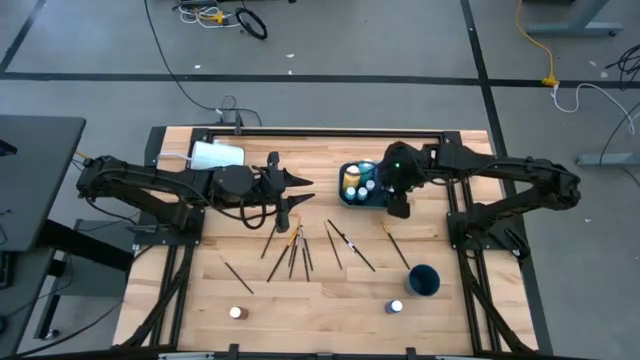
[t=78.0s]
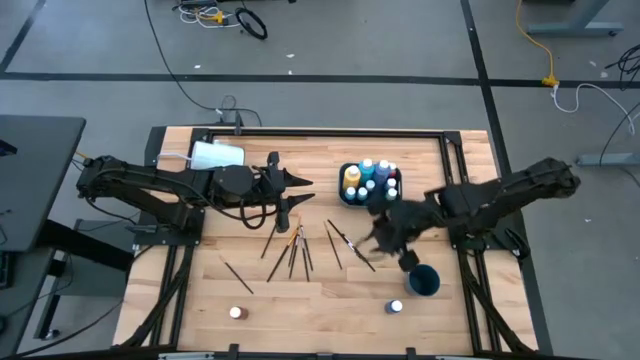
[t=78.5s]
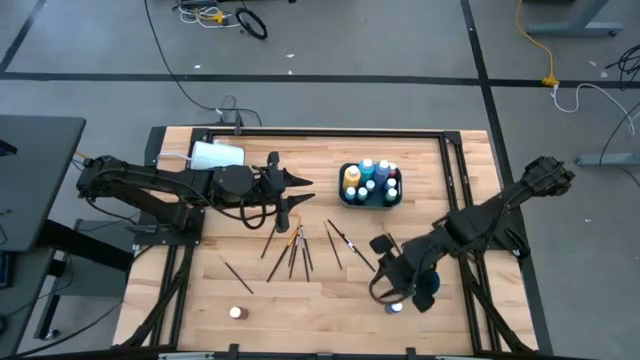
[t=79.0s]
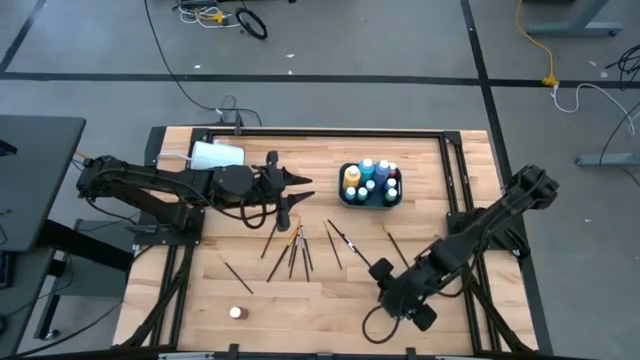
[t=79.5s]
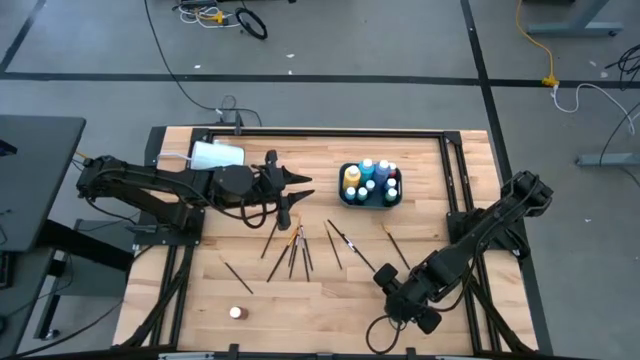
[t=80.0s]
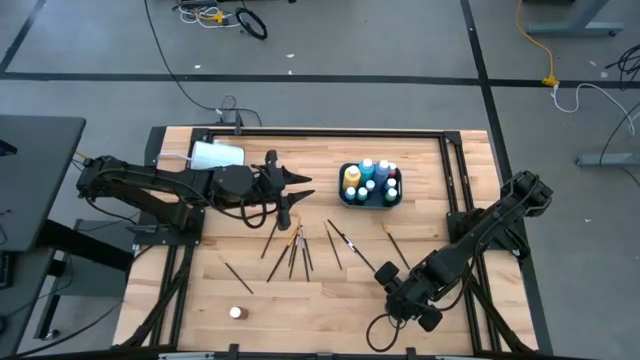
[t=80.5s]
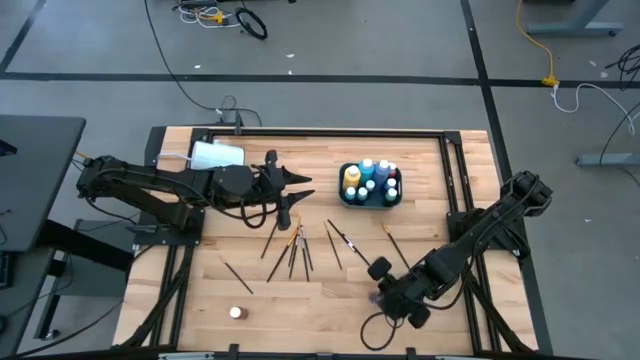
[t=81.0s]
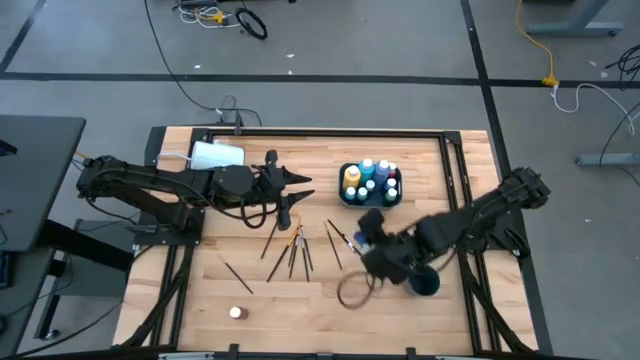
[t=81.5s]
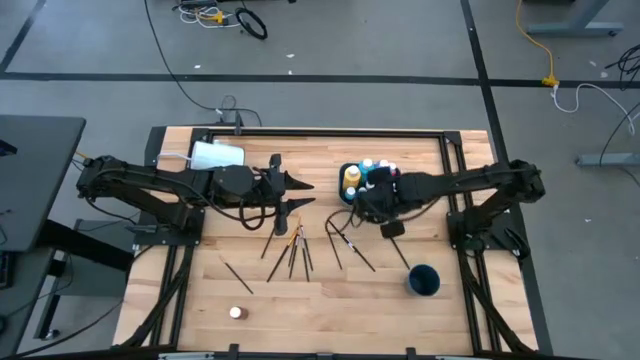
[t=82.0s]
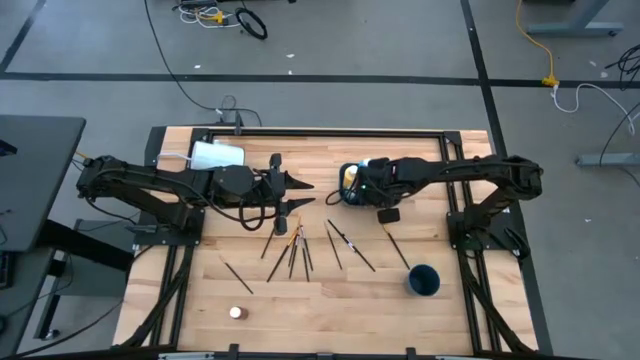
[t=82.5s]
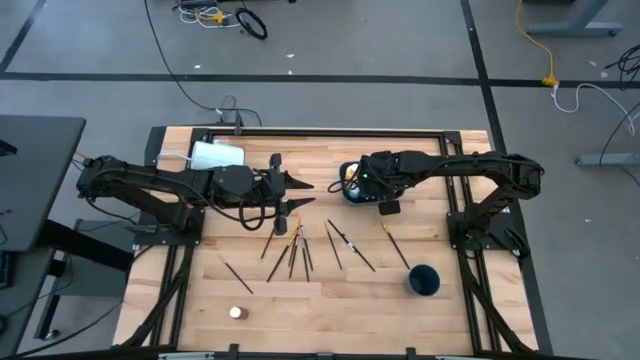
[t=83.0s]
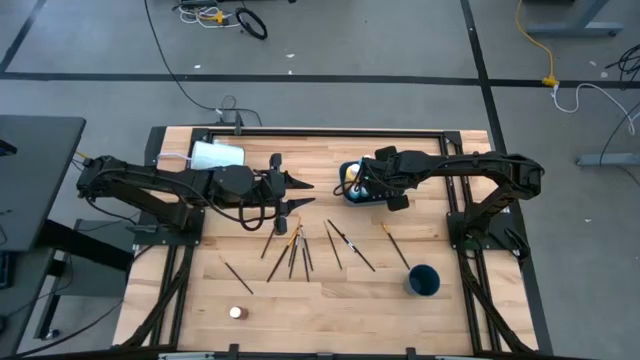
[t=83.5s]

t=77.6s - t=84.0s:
Task: Pick & Place Paint Supplies
Put the small dark blue paint bottle into the bin

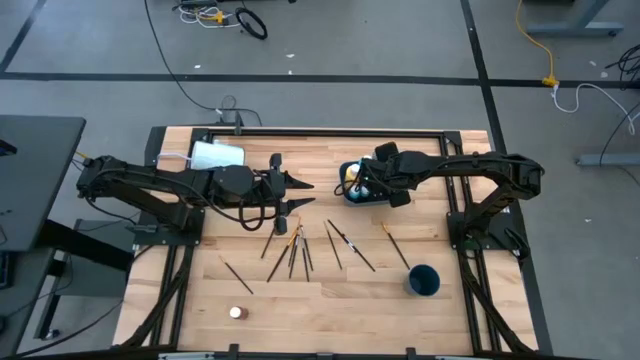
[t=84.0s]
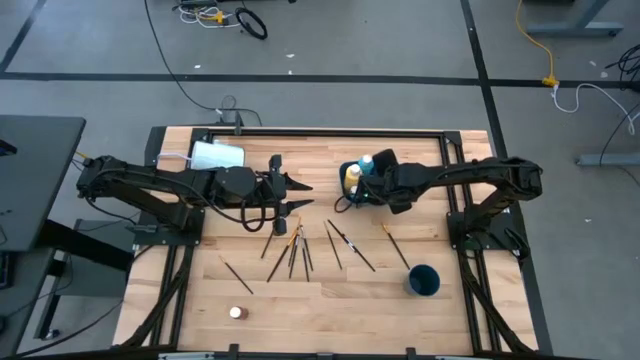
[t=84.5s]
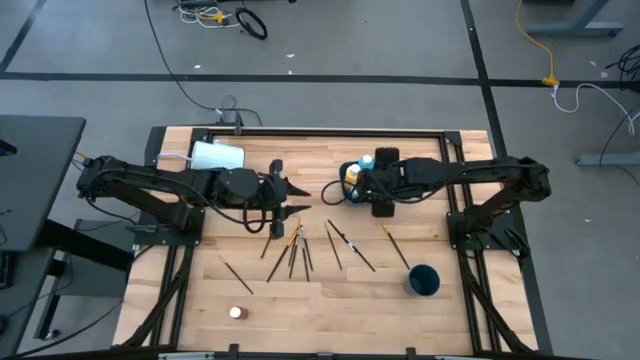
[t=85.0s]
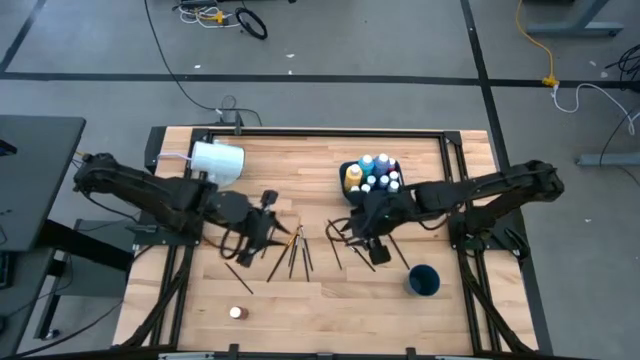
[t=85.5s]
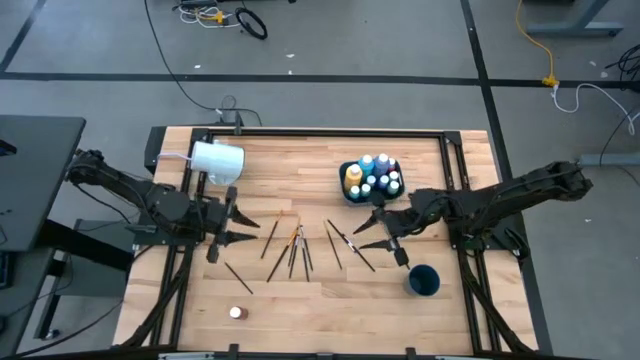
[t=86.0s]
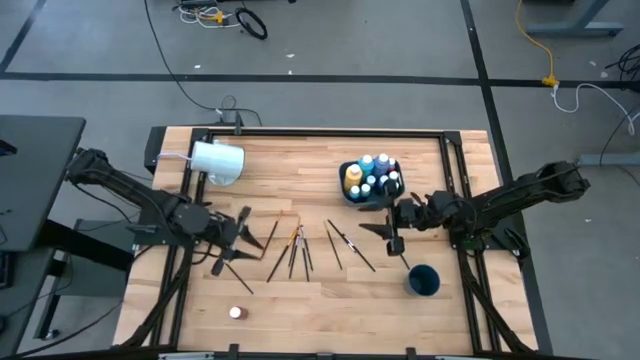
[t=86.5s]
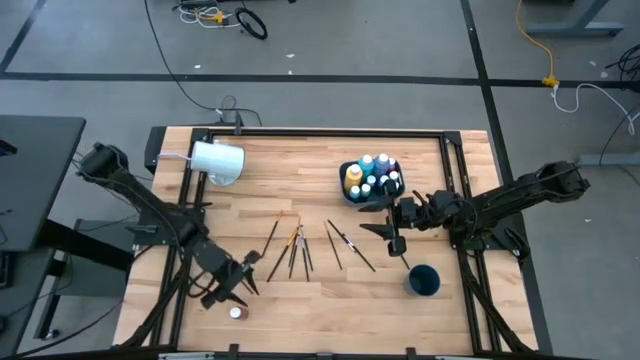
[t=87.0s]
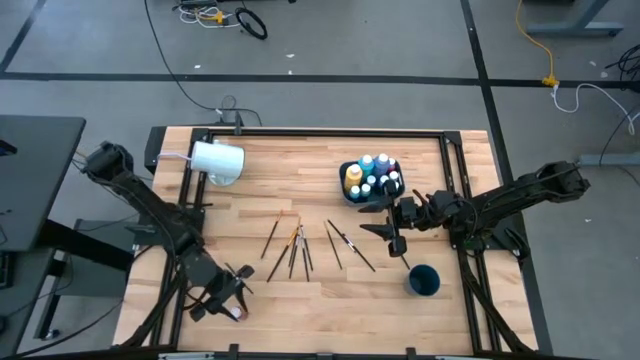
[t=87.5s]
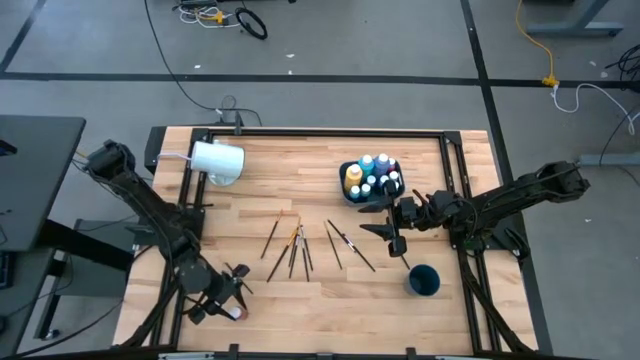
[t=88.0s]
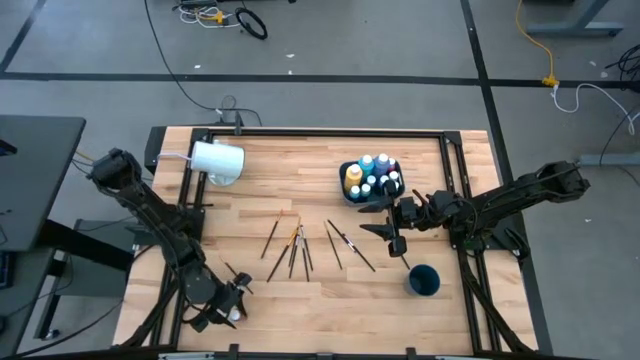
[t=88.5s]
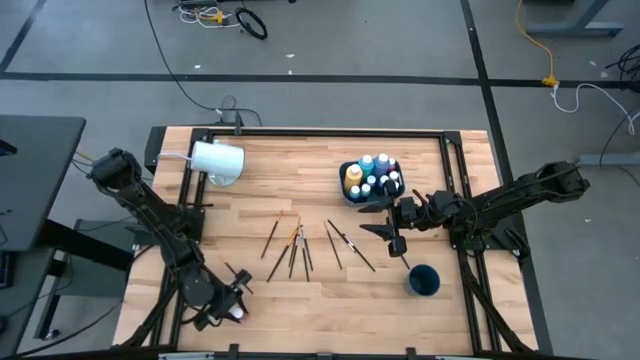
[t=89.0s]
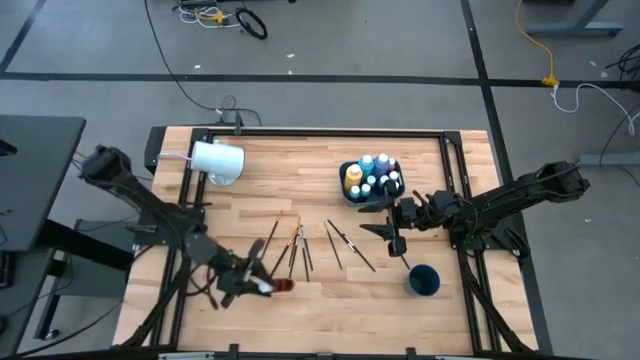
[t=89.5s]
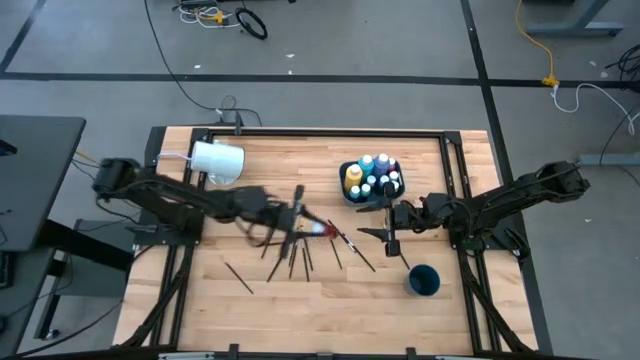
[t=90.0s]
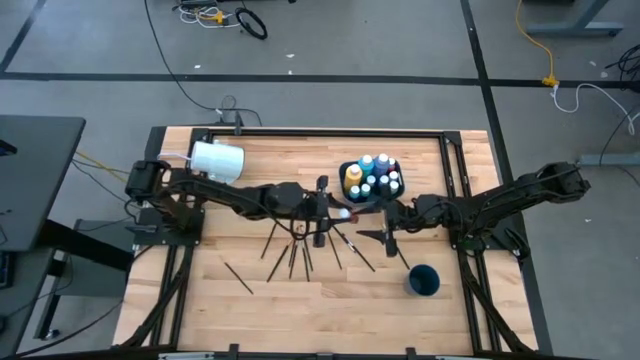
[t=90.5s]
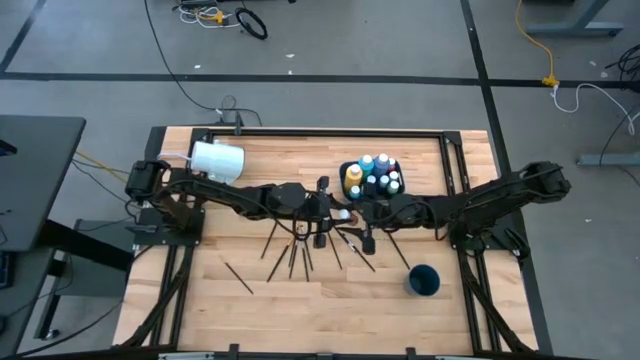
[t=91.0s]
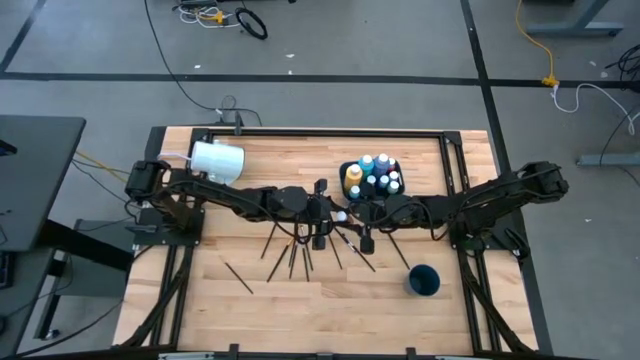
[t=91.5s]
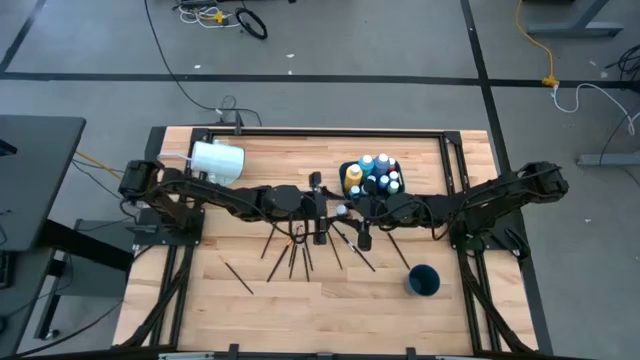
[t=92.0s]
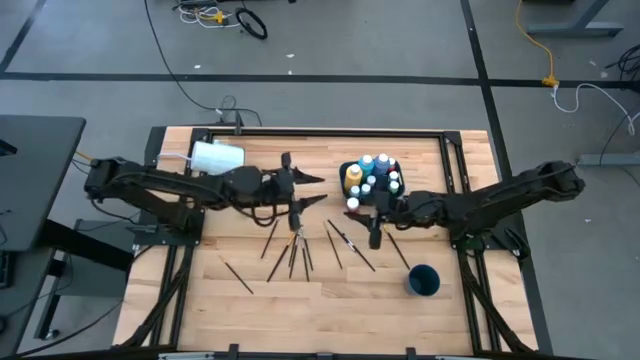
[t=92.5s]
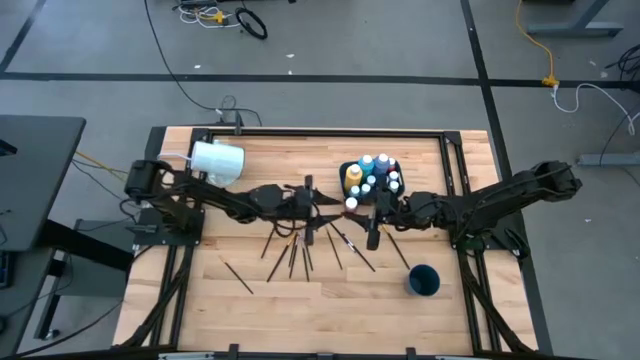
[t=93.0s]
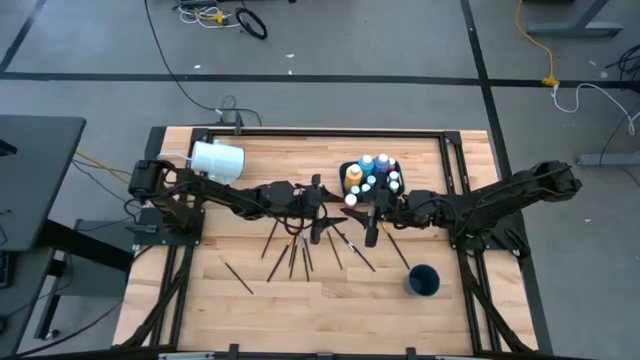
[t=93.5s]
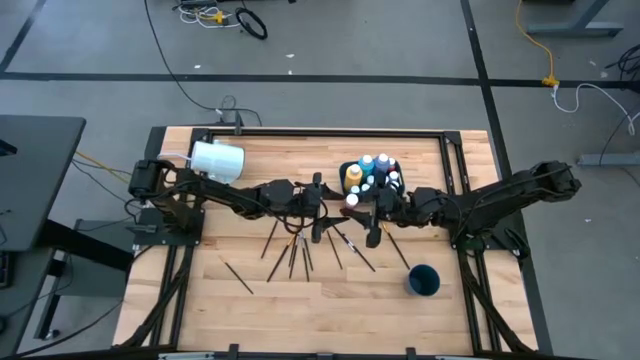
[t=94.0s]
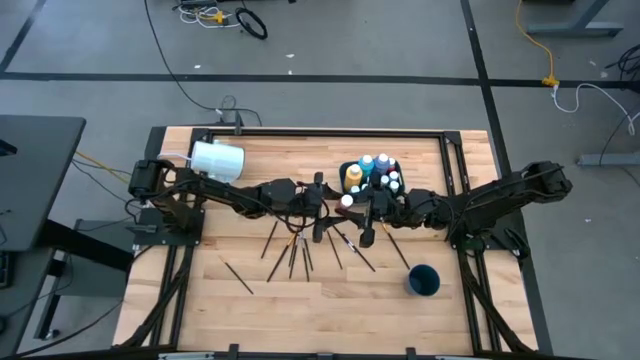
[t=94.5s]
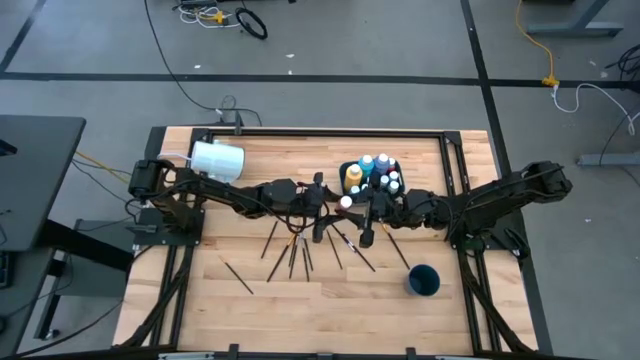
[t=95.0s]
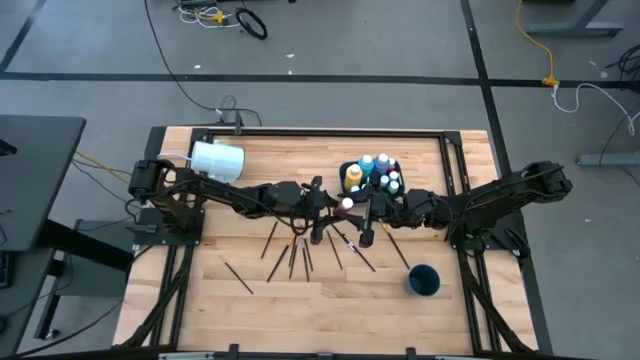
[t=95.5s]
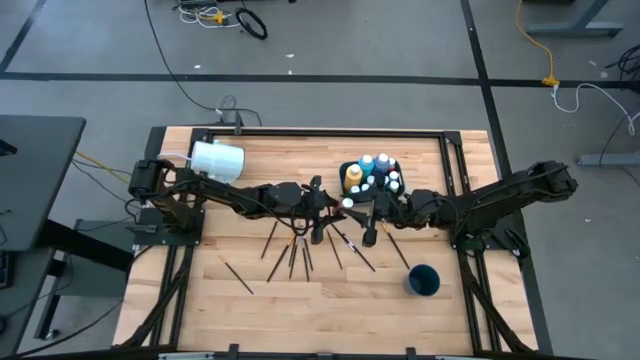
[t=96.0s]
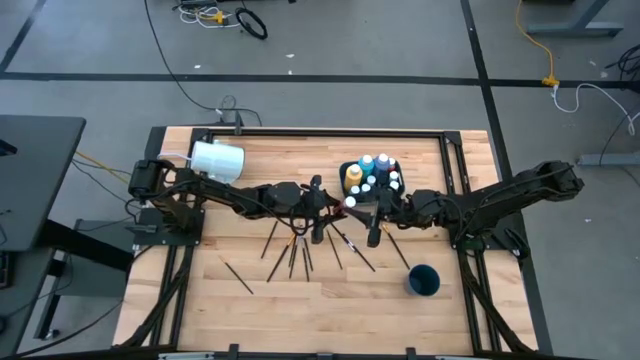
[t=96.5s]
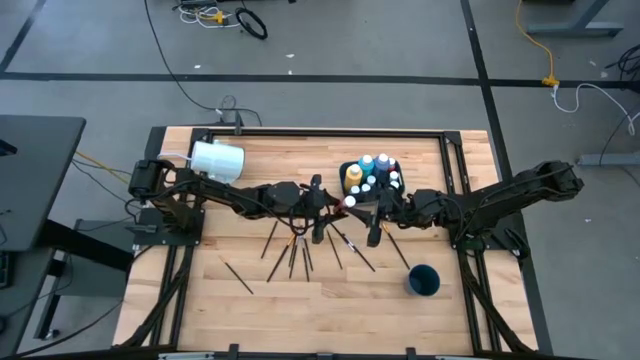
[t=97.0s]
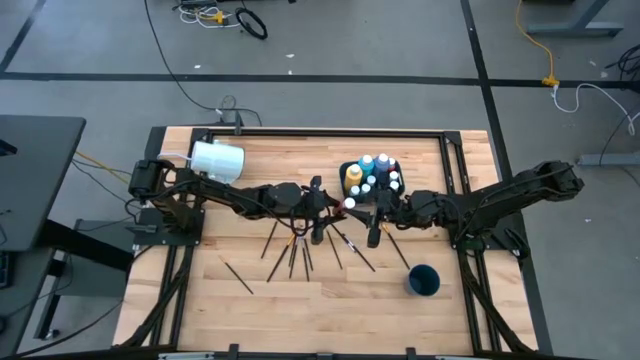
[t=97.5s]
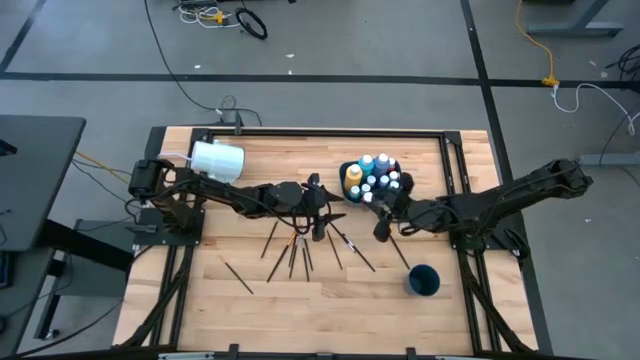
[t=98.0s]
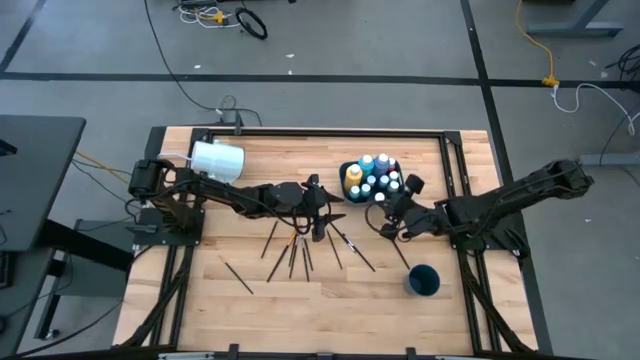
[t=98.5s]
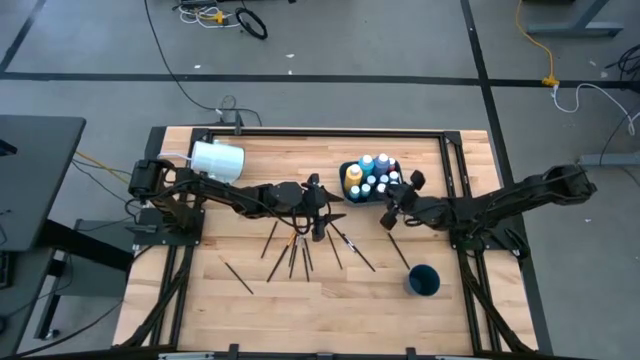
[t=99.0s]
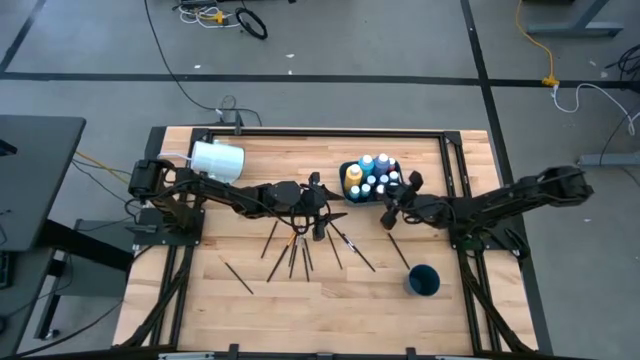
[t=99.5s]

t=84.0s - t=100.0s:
Put the small red paint bottle into the bin
